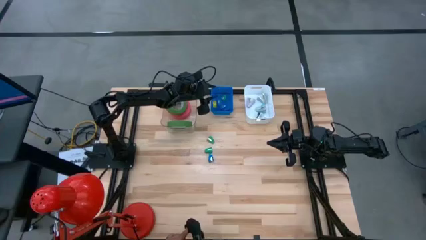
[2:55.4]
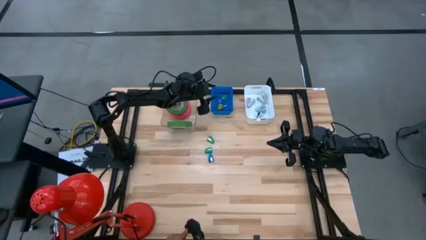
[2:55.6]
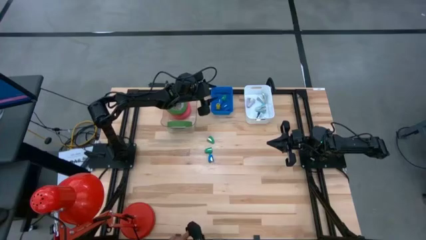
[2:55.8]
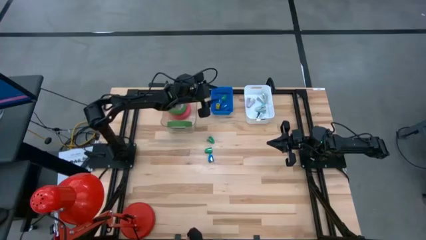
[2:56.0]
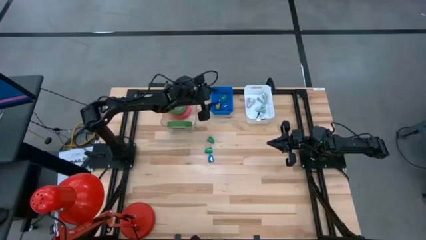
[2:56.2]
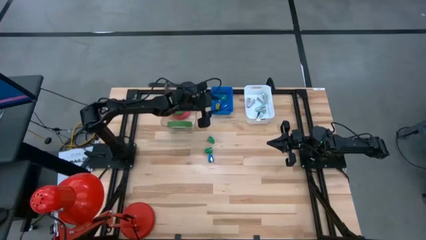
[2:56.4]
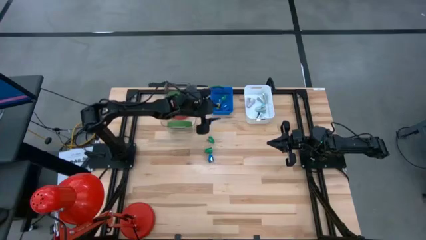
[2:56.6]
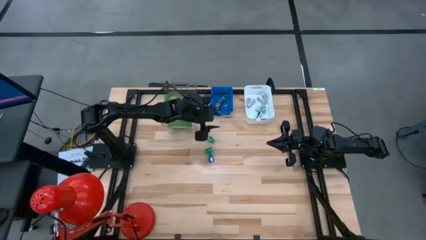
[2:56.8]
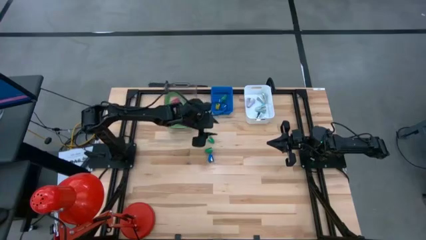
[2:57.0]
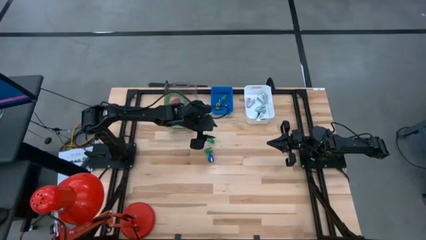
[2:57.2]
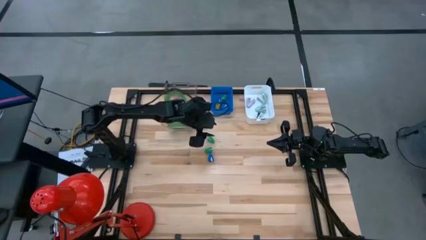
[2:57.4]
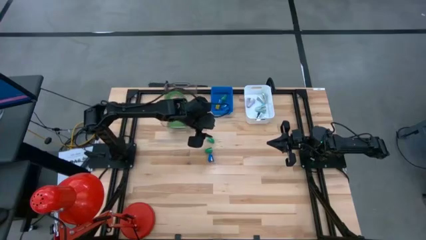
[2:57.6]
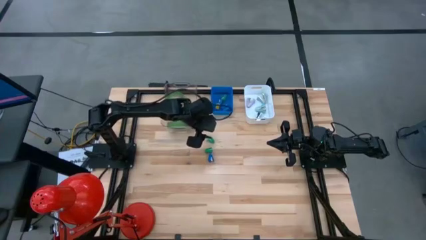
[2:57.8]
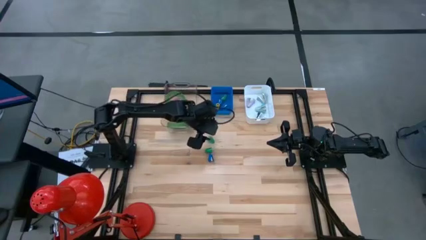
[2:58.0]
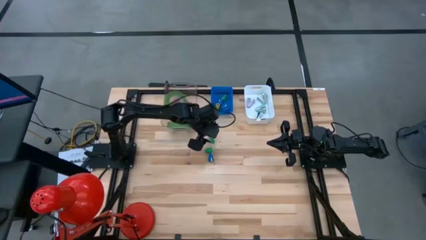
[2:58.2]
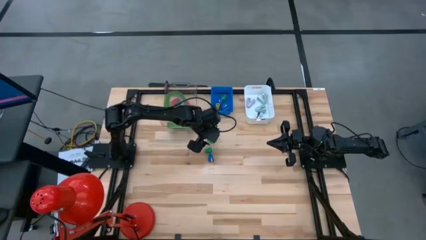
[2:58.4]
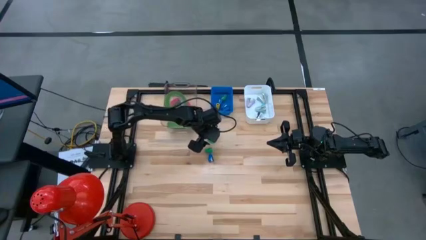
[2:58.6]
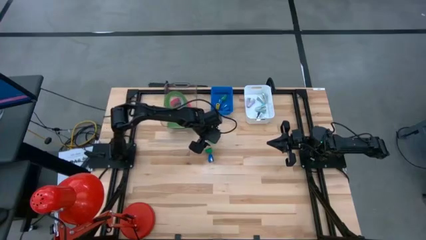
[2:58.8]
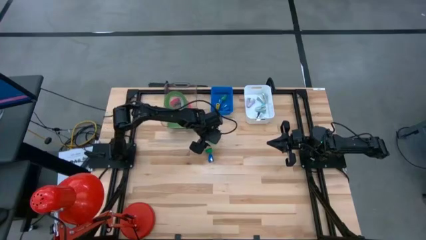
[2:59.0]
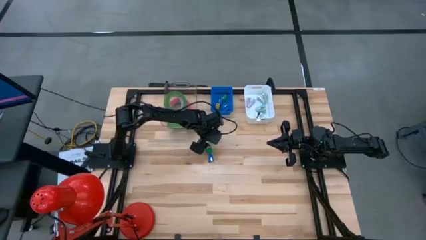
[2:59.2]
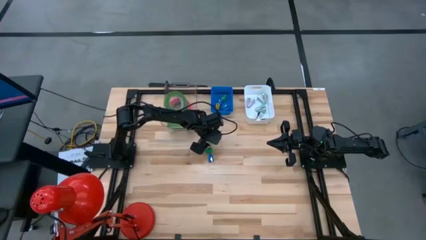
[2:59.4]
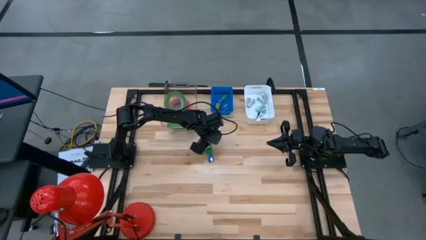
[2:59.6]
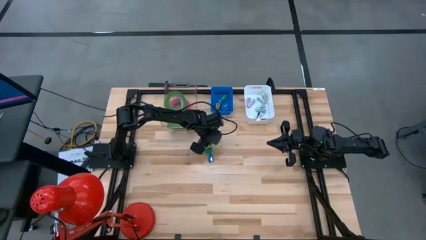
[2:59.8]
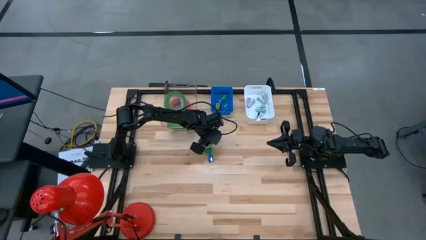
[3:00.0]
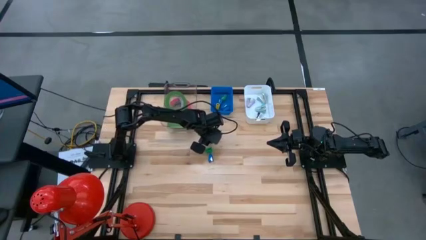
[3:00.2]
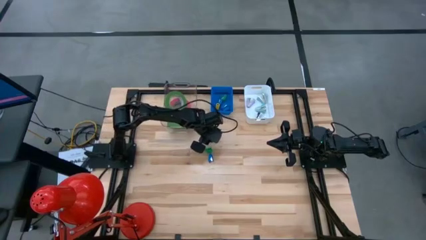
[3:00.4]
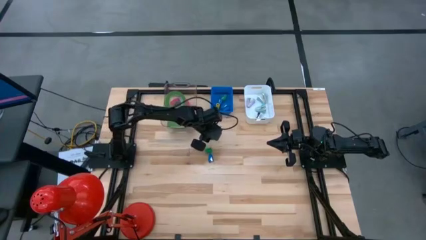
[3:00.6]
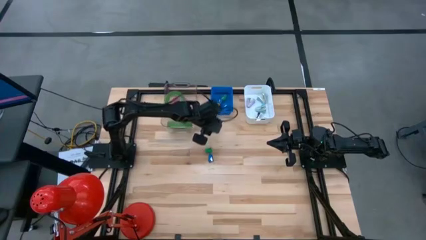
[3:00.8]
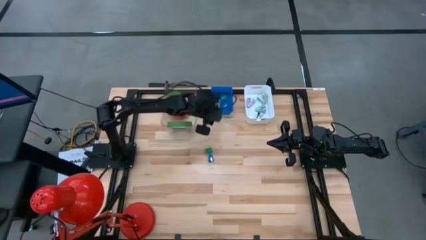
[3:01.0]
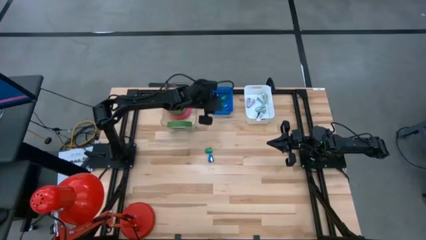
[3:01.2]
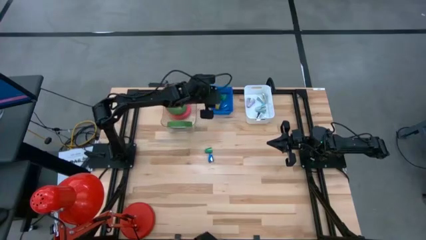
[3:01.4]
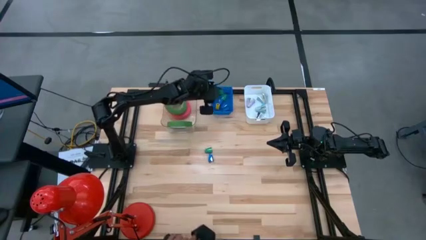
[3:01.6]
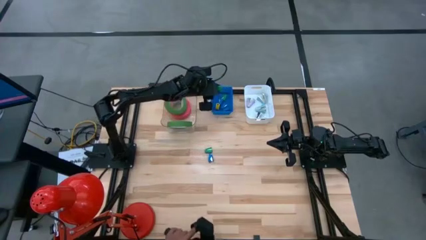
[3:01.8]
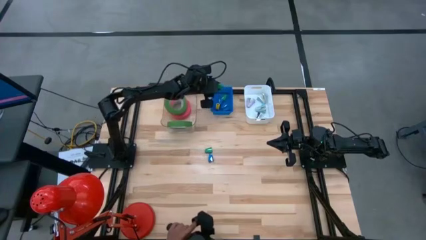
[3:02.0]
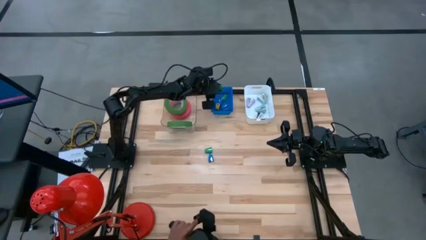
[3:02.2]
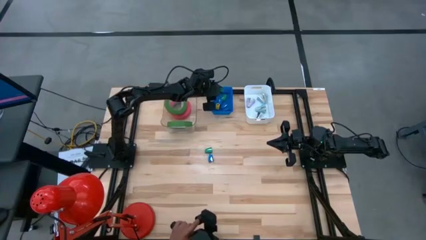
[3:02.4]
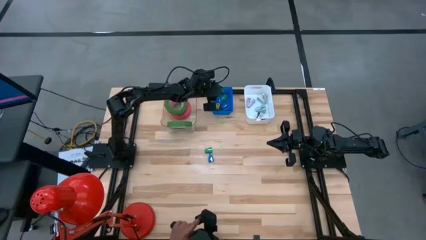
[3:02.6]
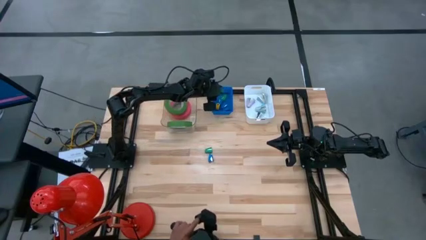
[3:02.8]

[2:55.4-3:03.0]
Task: Pick and place Stapler, Stapler remover, tape
Put the top green stapler into the blue bin

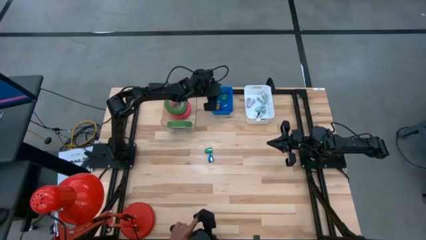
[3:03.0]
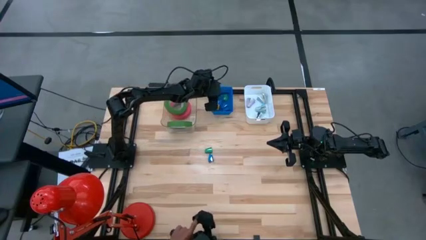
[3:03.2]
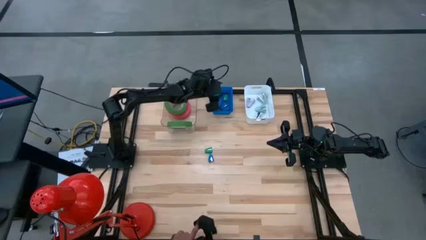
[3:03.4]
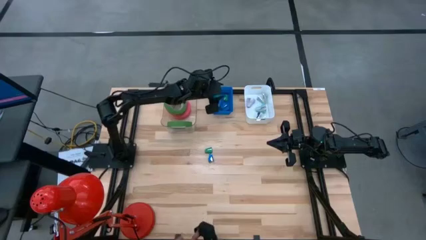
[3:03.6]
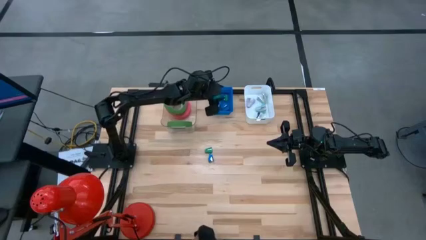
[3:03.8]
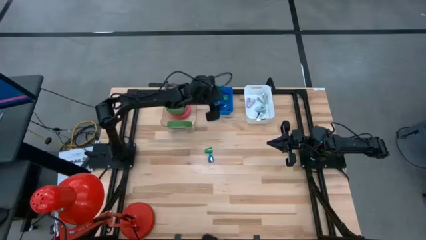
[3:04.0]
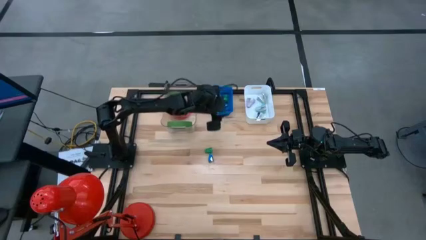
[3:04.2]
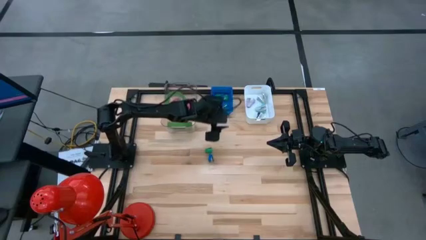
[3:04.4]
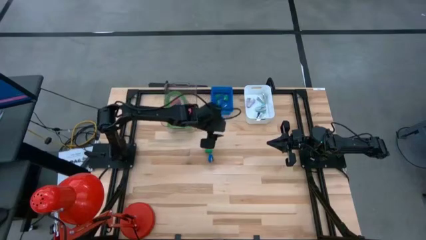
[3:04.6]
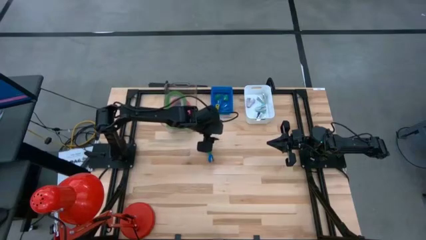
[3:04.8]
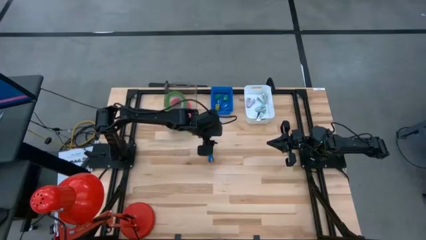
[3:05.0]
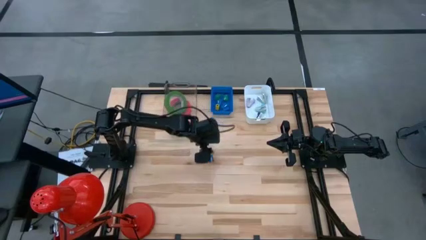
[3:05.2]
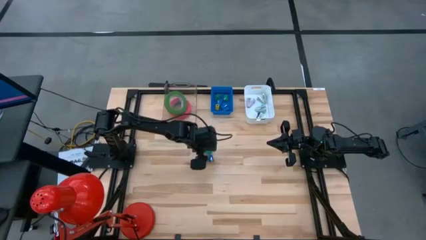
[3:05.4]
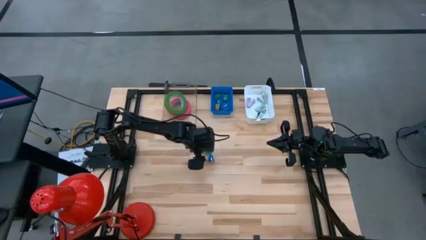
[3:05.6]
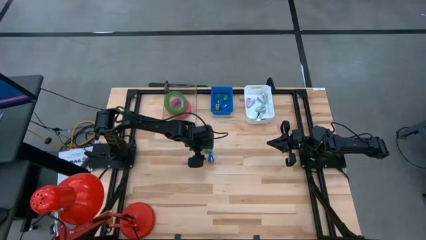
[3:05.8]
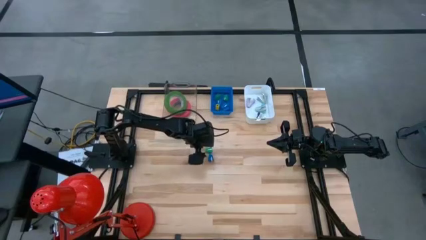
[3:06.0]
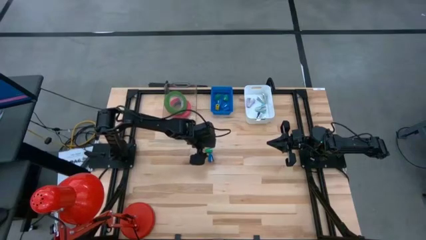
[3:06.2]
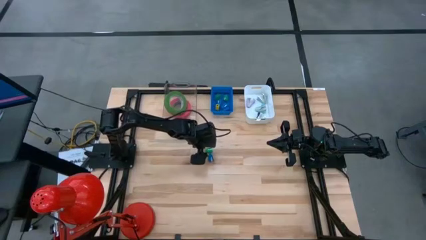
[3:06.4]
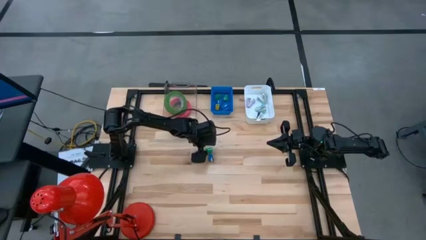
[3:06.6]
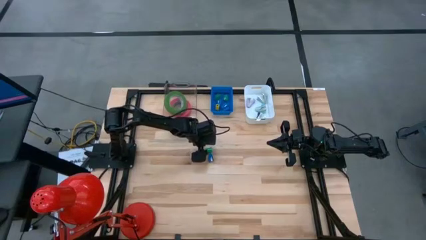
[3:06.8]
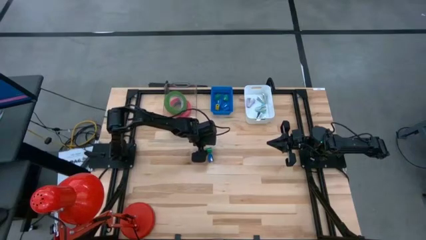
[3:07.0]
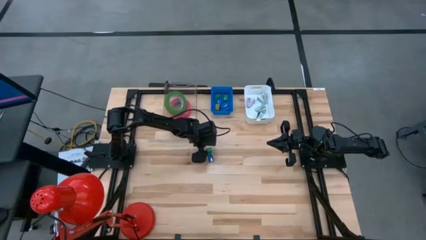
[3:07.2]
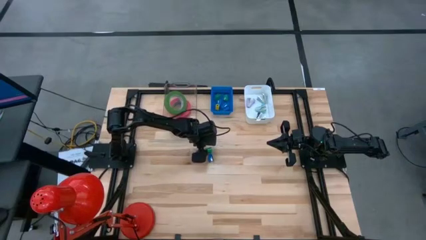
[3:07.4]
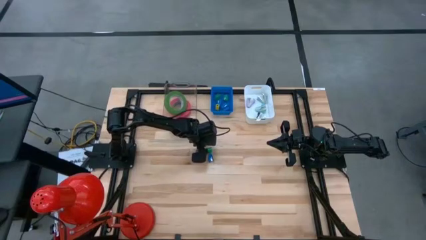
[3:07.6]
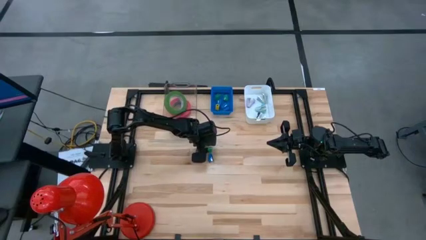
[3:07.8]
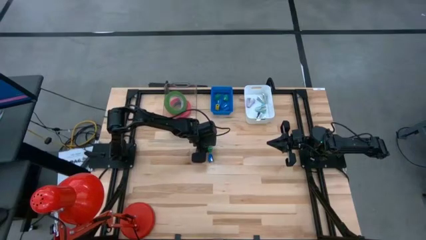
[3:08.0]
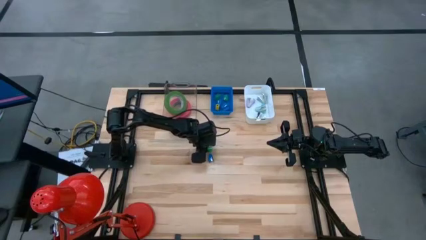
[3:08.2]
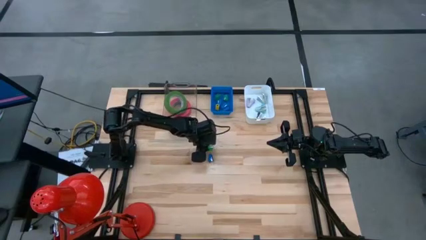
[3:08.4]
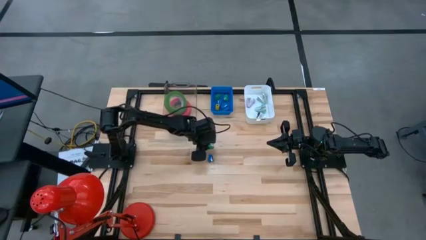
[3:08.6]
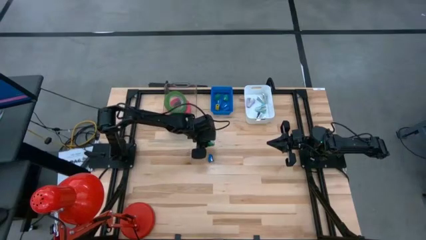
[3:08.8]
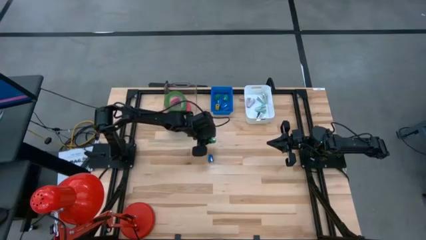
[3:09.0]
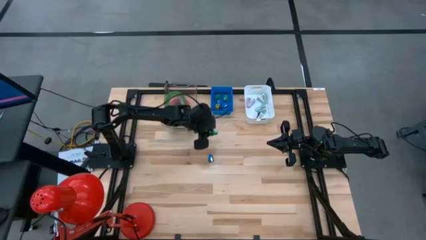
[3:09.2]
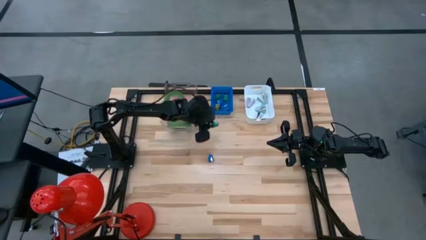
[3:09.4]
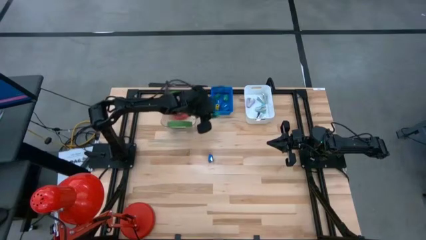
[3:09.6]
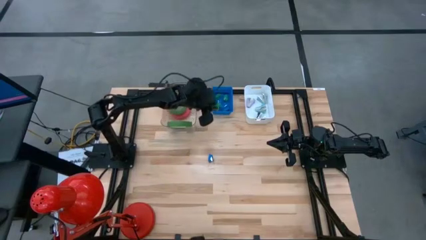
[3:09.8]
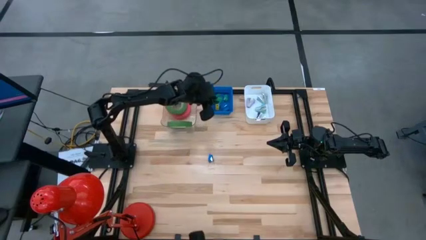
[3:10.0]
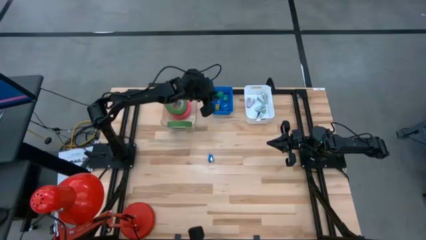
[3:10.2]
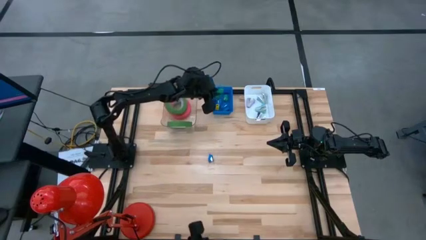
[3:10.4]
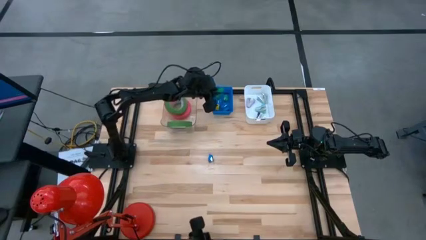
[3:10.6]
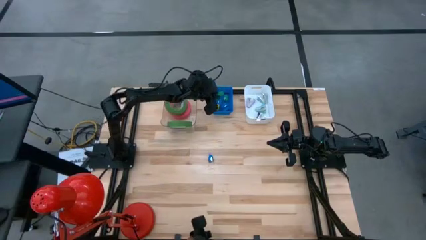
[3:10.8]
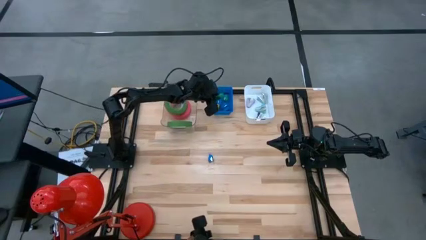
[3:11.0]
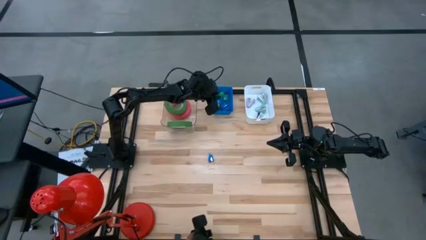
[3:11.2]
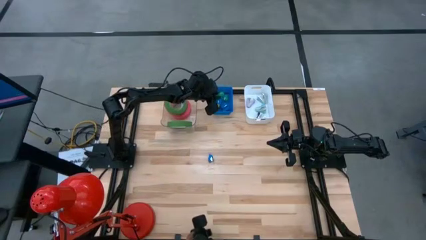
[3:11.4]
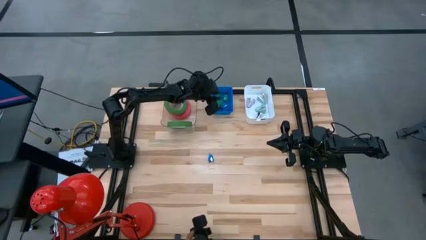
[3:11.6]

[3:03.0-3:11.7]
Put the green stapler into the blue bin
